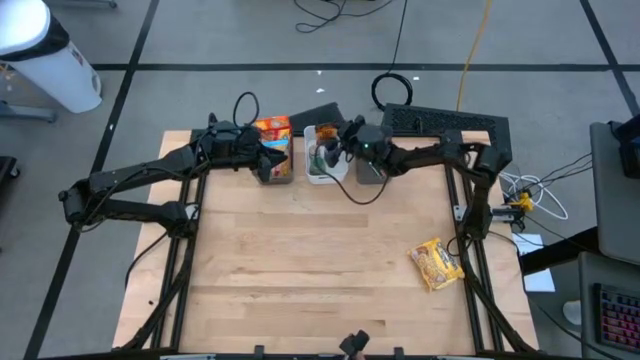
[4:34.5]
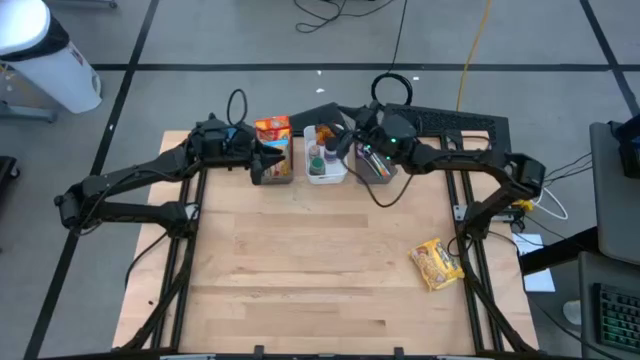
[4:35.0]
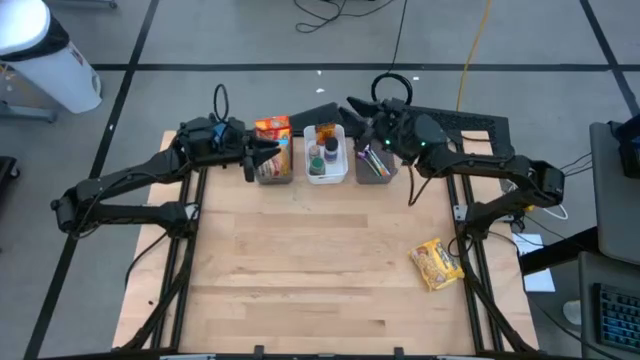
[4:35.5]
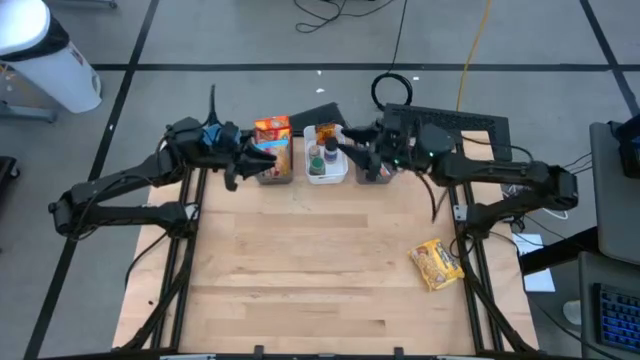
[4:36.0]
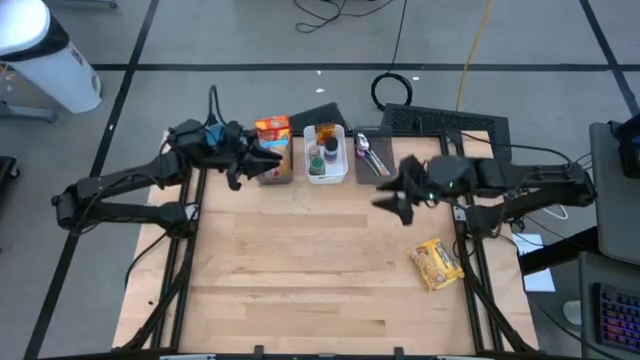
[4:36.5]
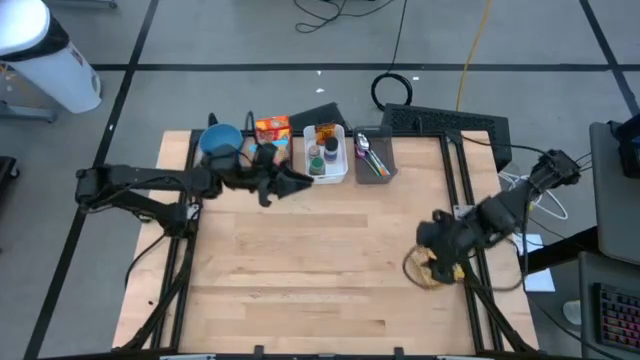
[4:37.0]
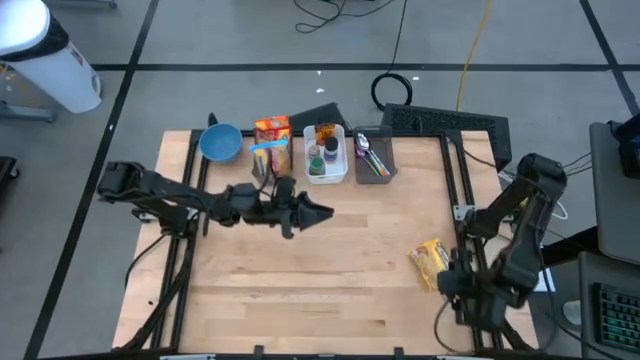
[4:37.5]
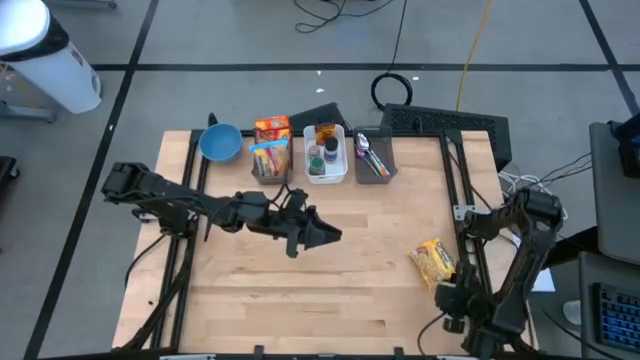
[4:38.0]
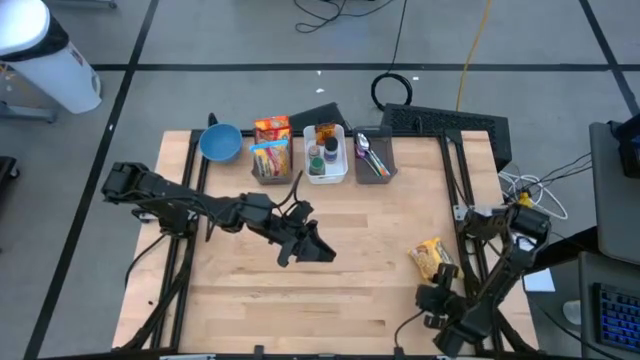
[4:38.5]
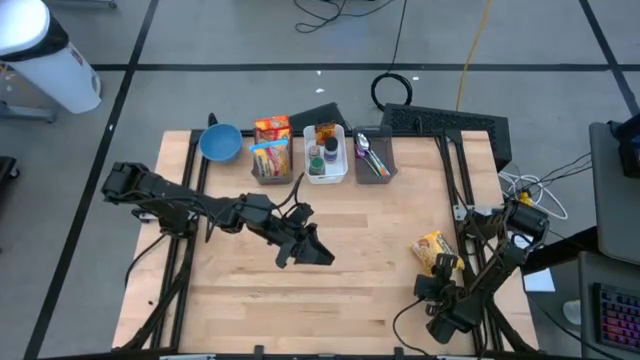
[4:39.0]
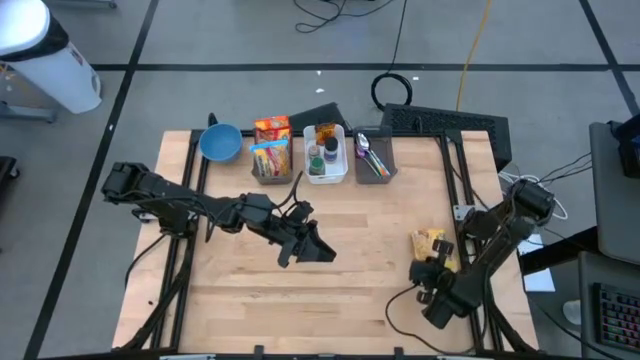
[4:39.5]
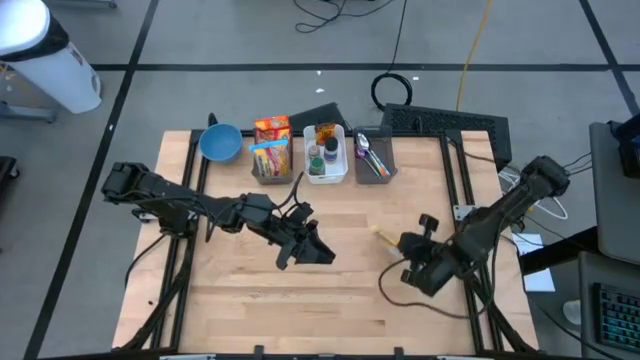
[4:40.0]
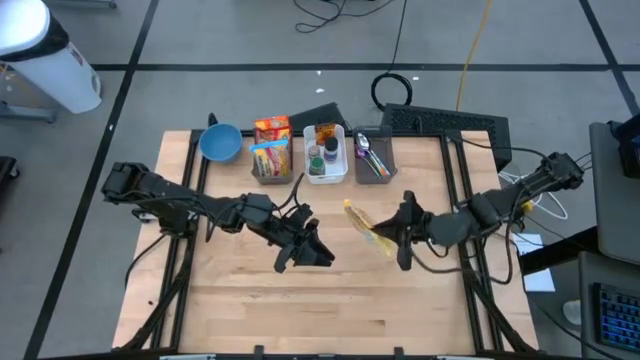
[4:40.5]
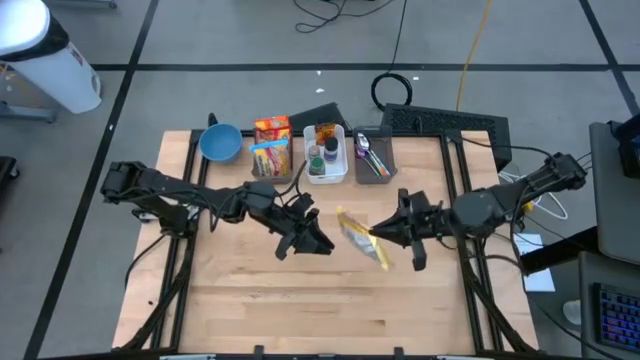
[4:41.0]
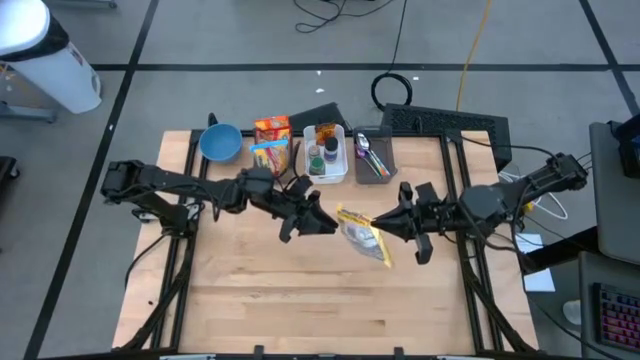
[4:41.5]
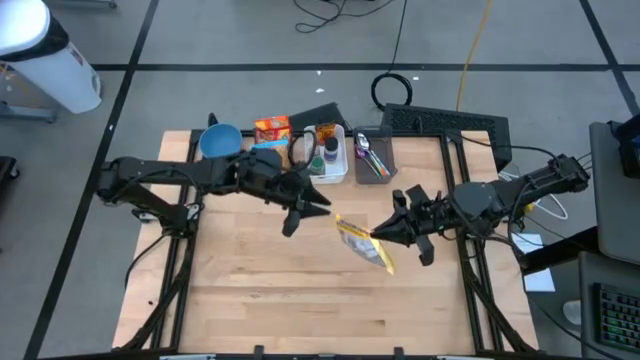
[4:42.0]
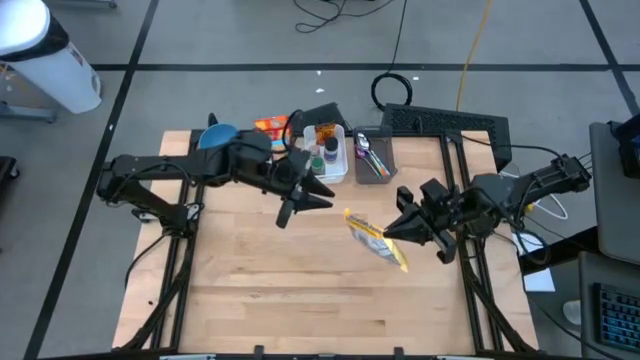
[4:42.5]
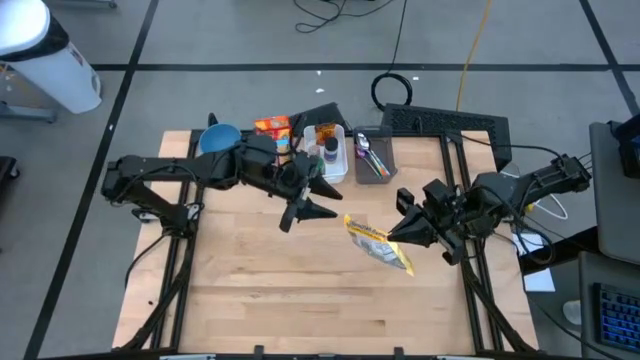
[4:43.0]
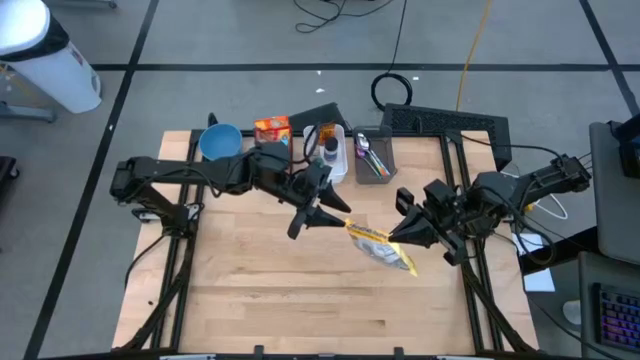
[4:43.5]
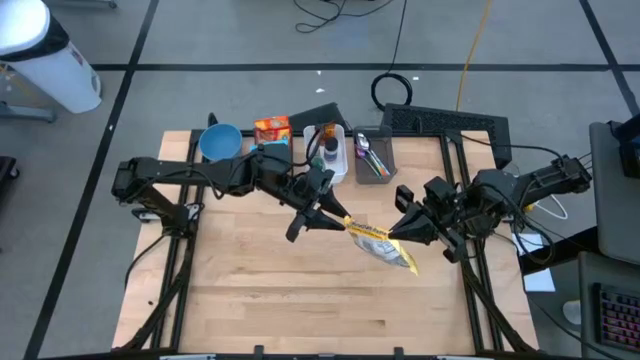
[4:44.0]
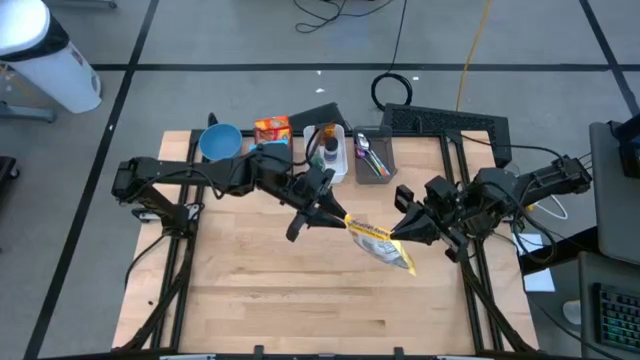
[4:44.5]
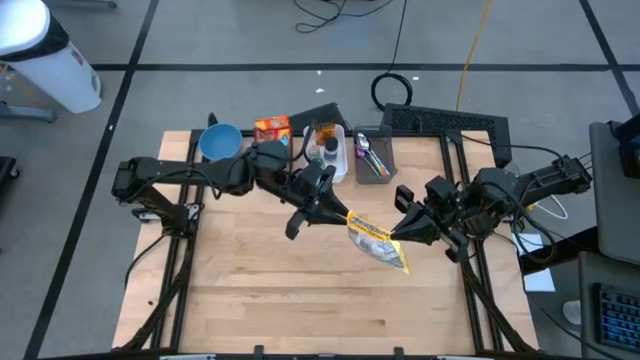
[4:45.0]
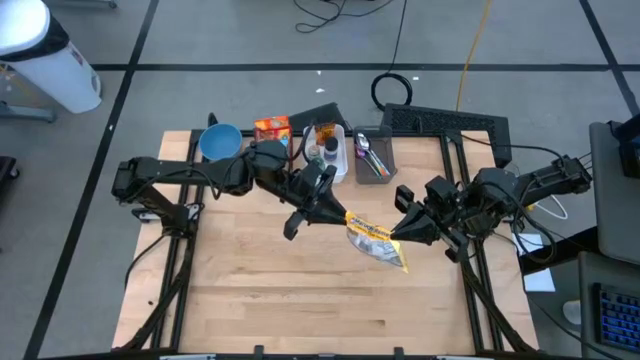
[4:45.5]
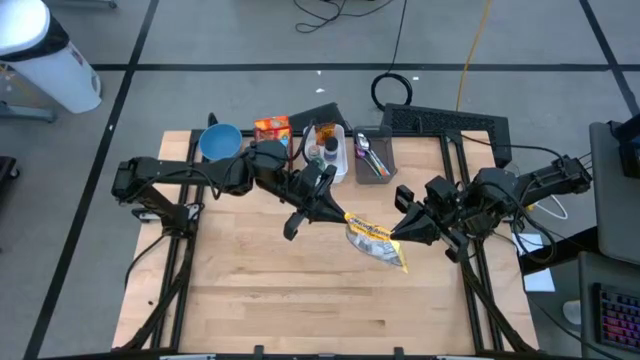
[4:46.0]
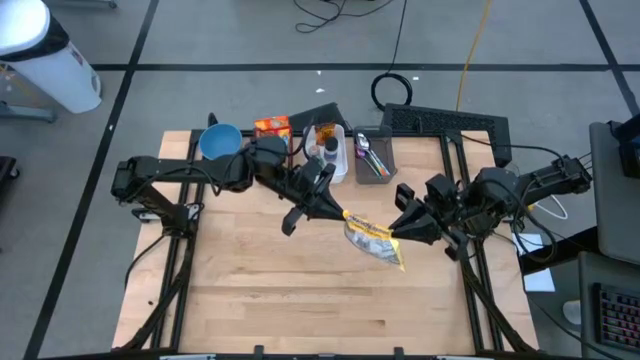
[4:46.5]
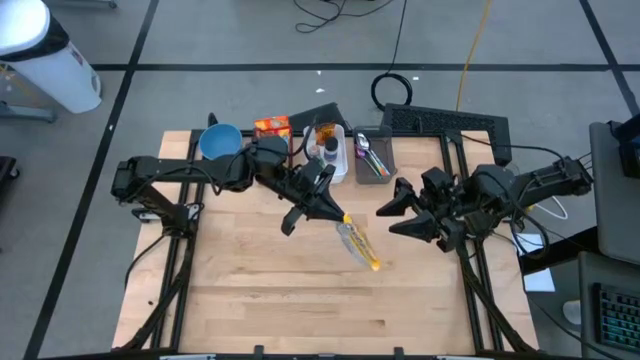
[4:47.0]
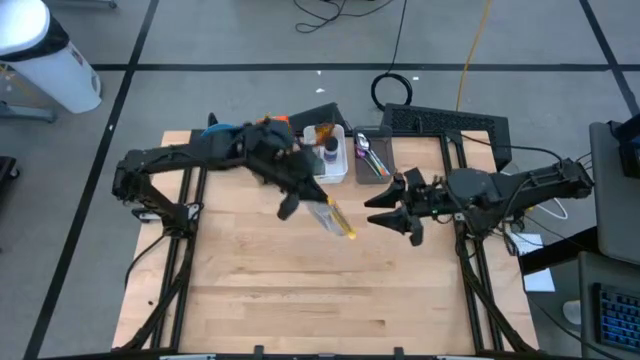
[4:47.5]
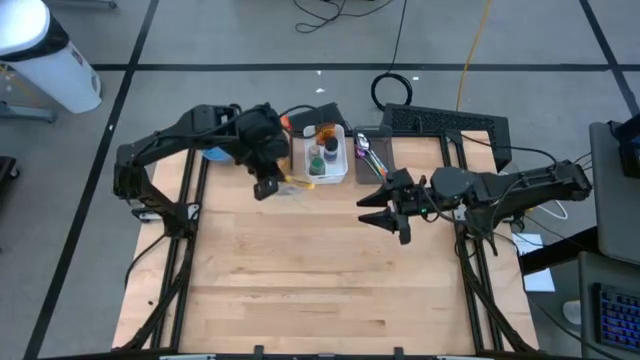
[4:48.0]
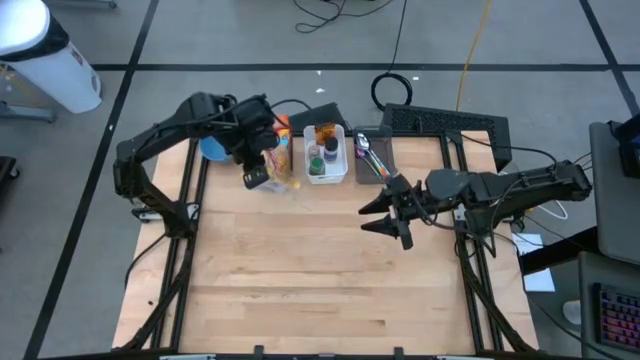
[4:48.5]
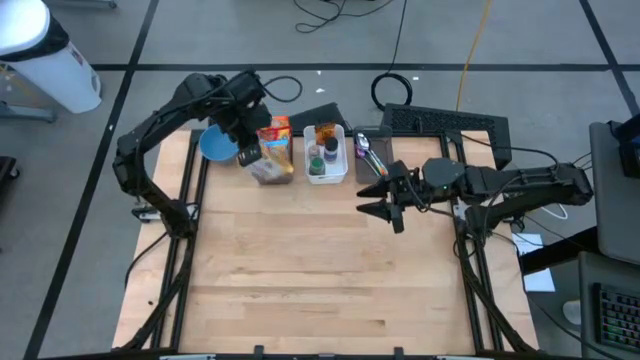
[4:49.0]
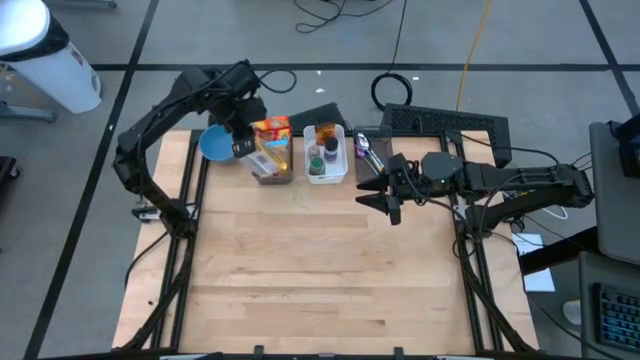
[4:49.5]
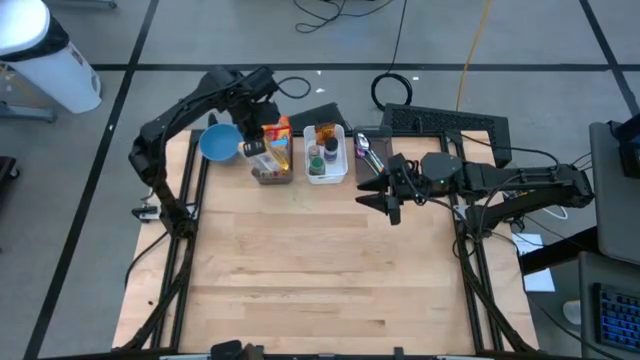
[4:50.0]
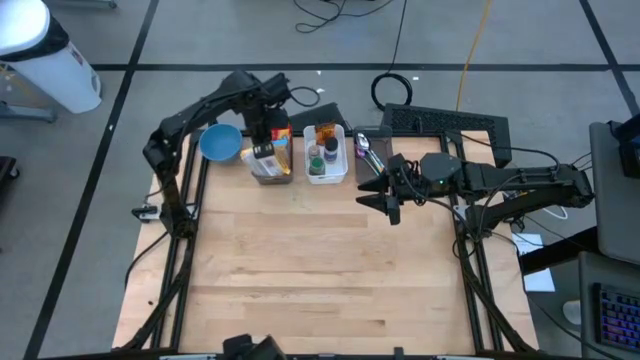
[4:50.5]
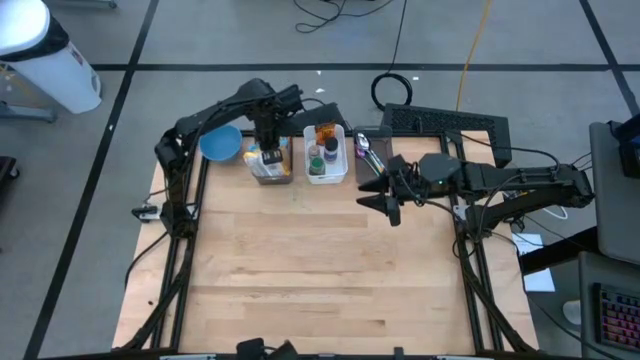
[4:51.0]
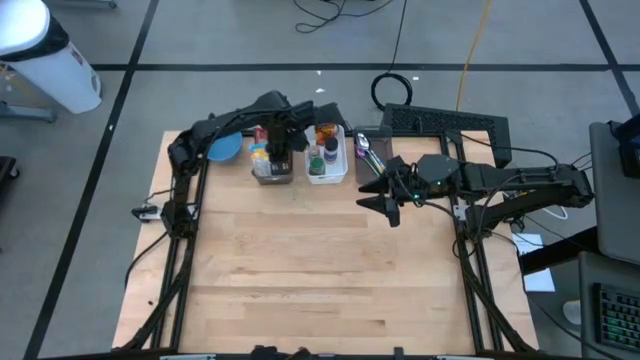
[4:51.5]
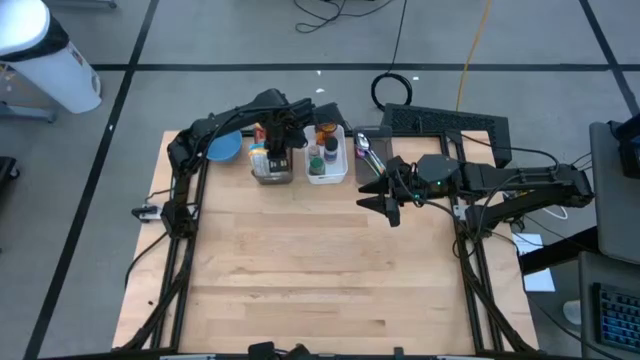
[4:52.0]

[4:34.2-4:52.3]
Task: Pick & Place Food Item
Put the yellow noodle pack into the left black bin
